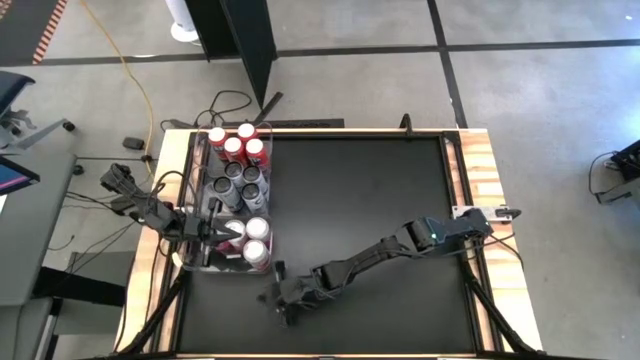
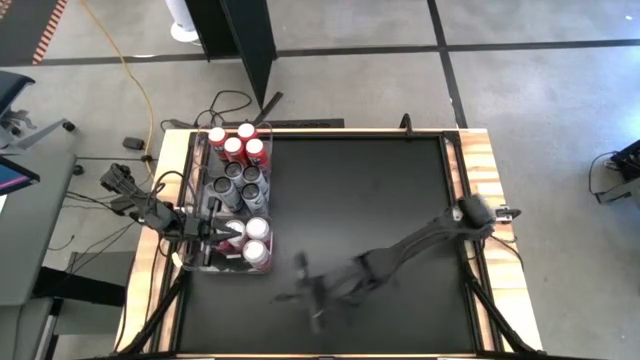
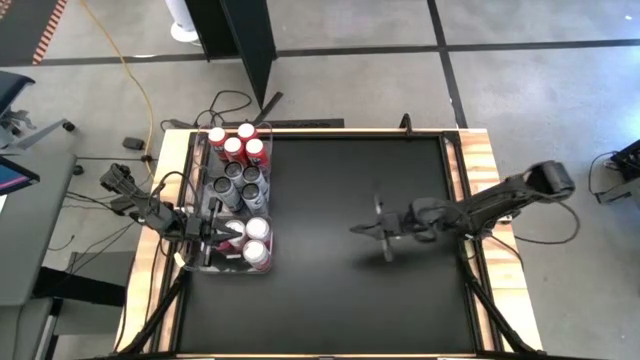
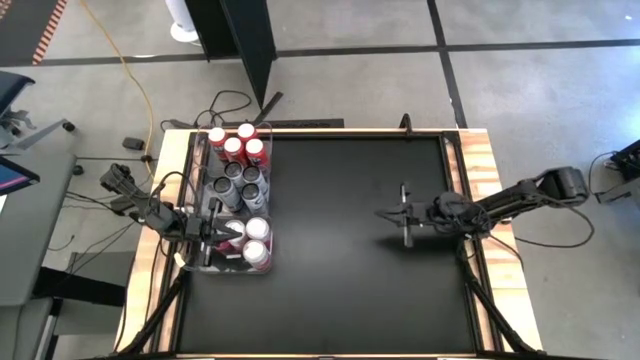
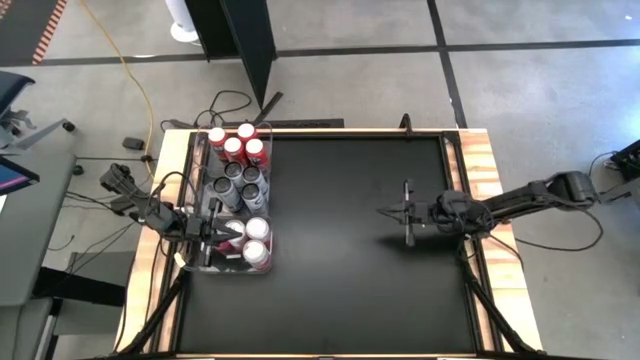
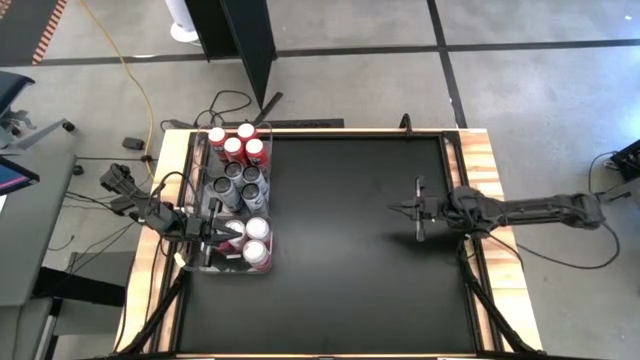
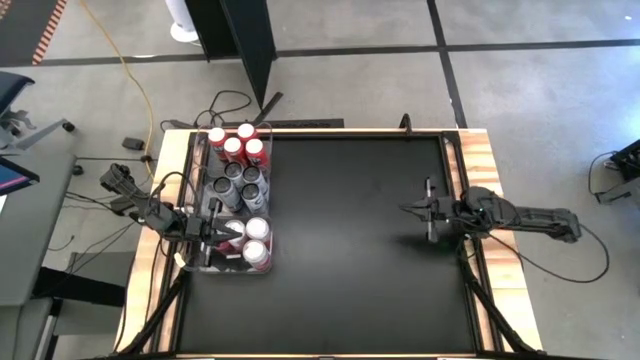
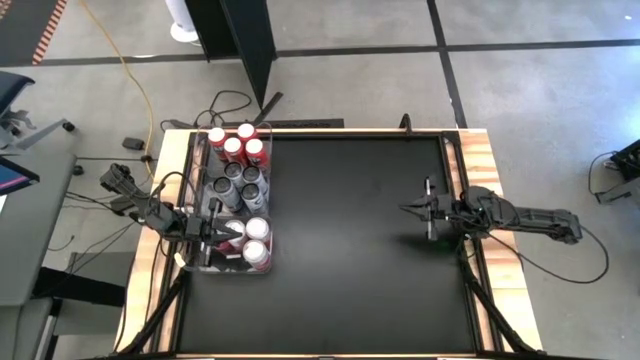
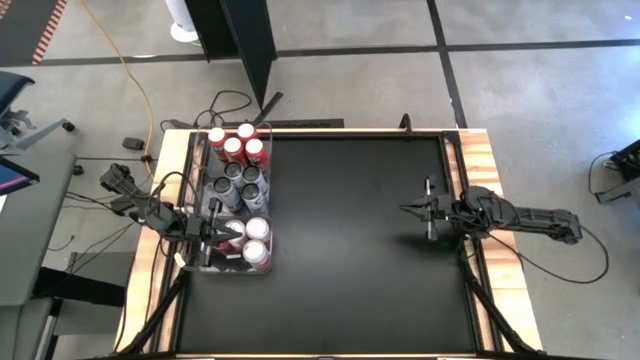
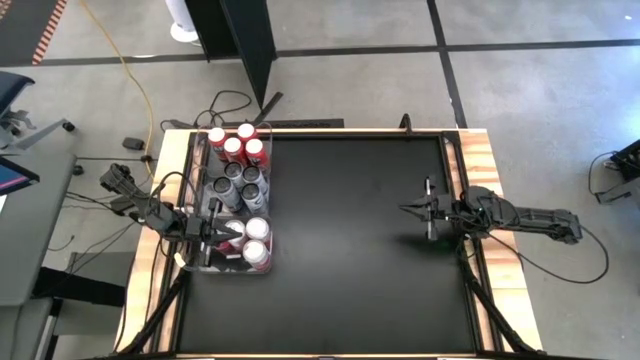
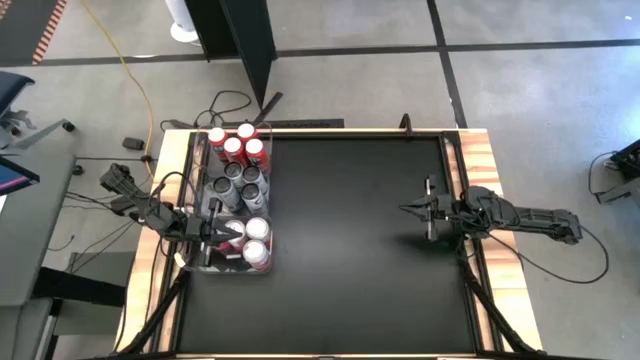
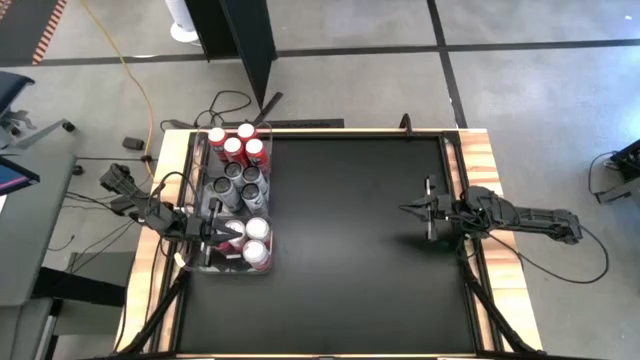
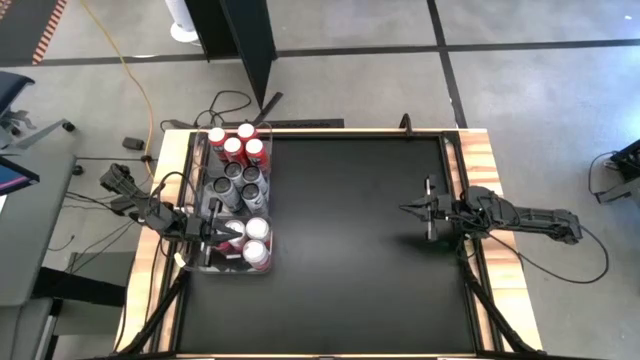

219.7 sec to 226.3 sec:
Task: Sort soda cans
Return to Home Position

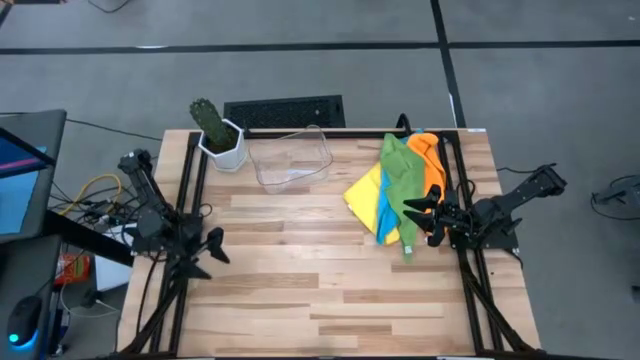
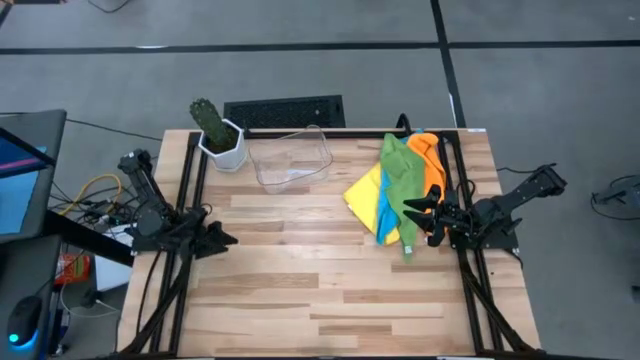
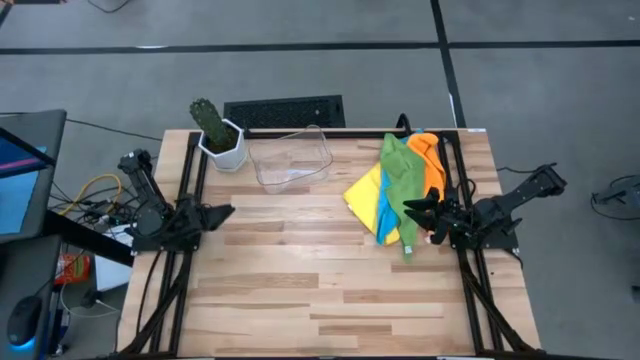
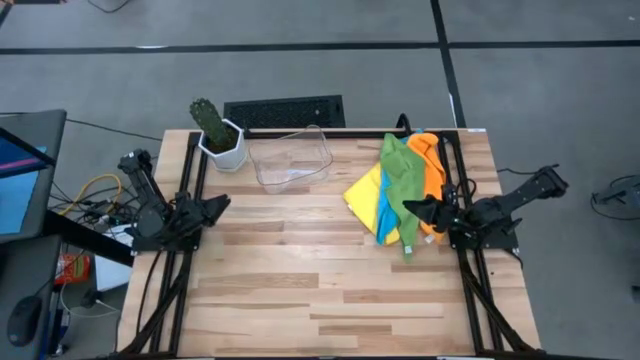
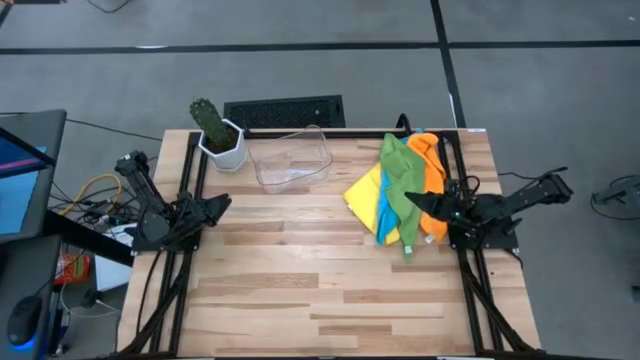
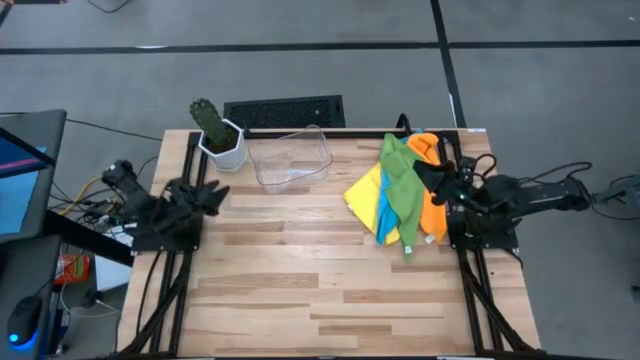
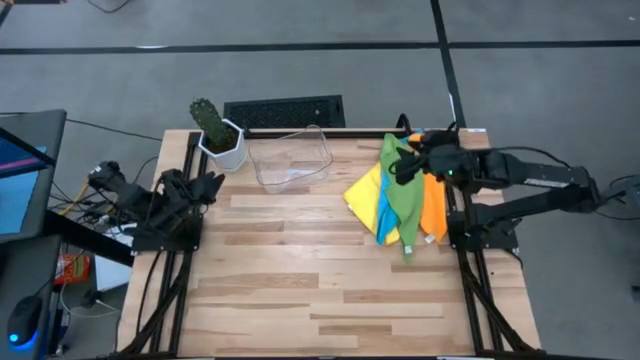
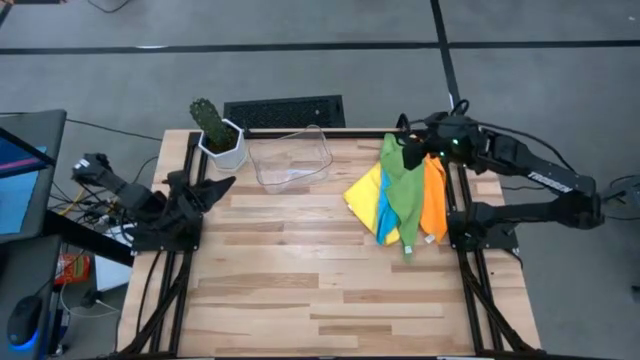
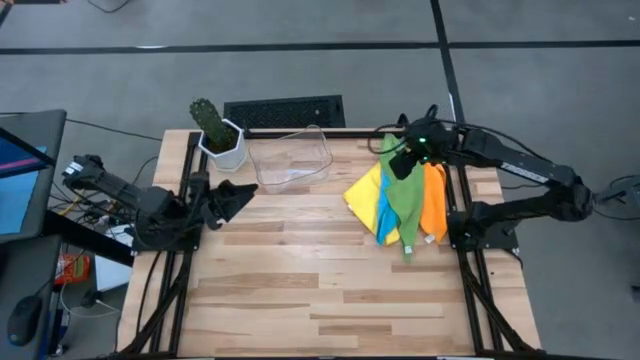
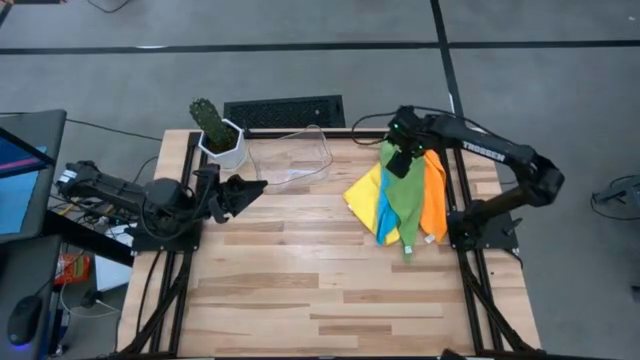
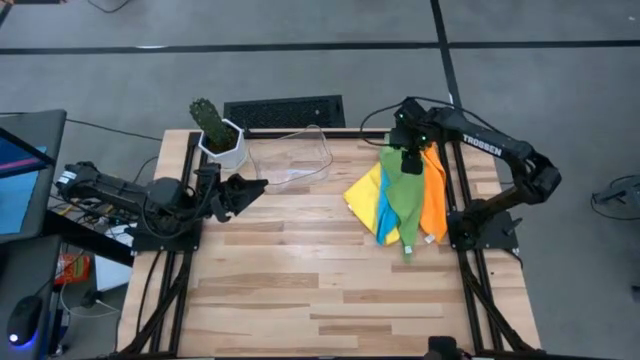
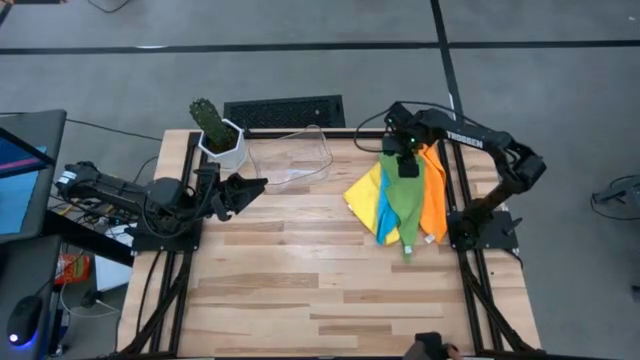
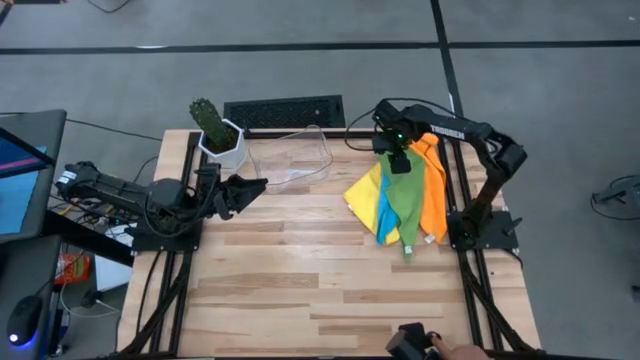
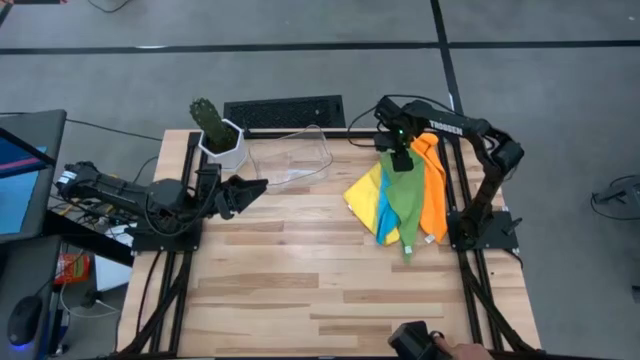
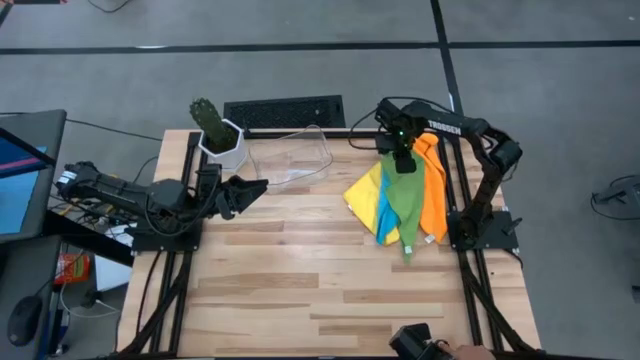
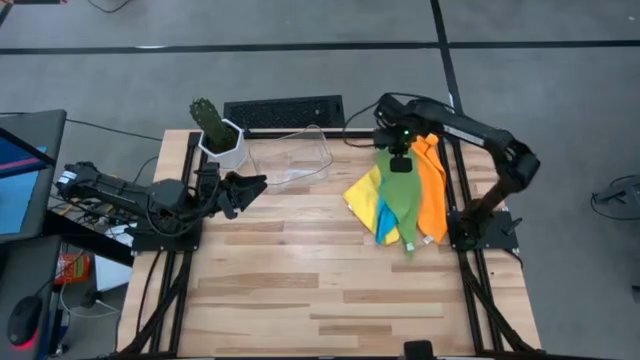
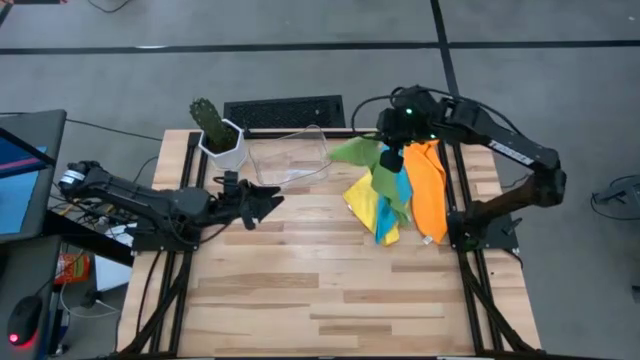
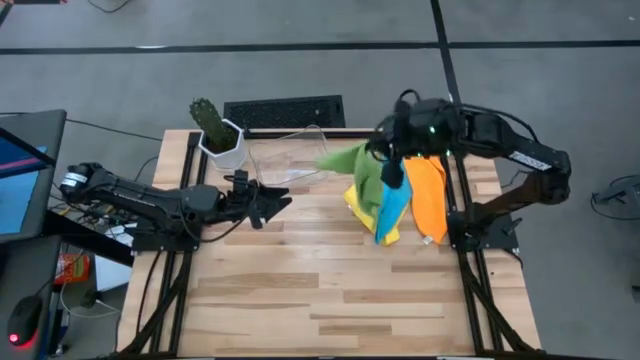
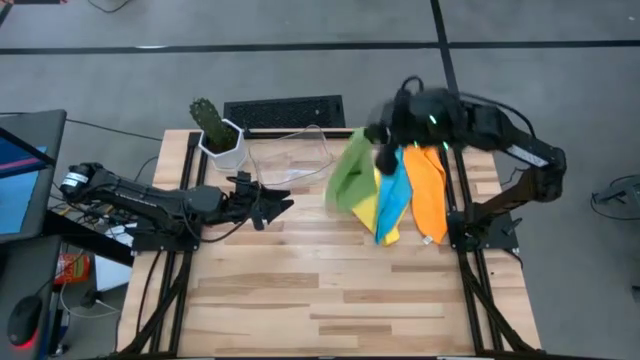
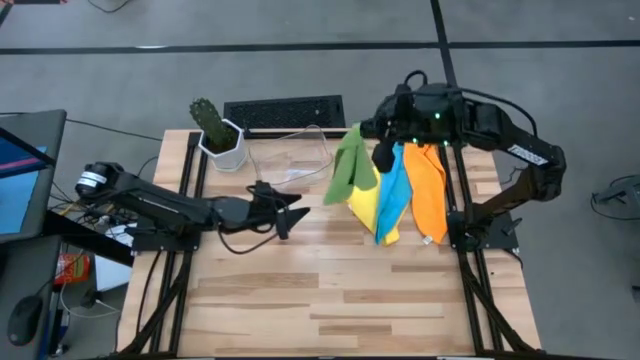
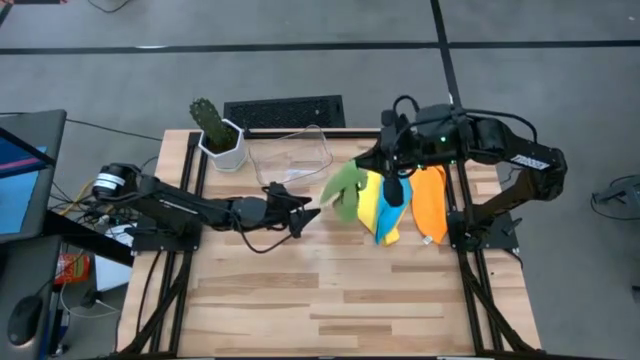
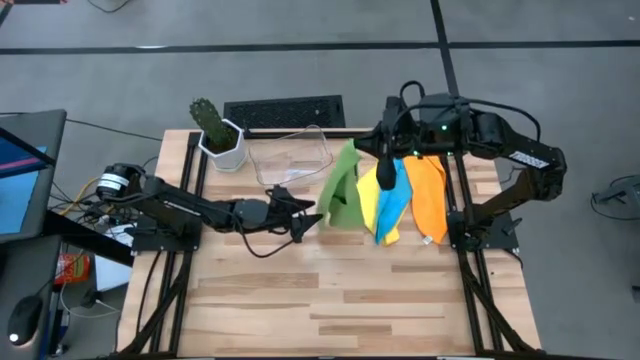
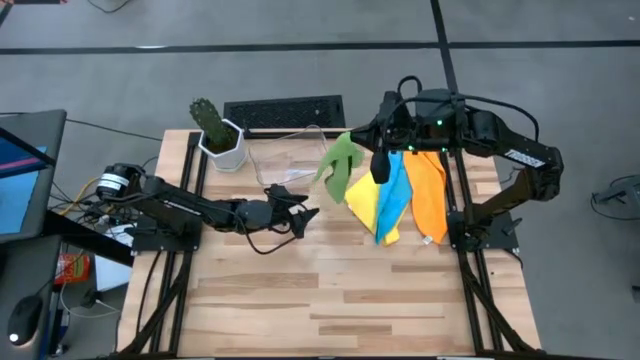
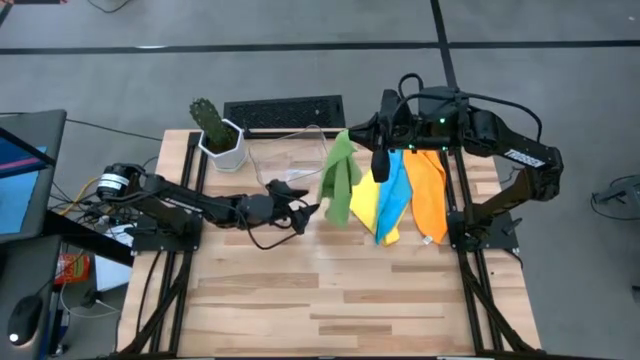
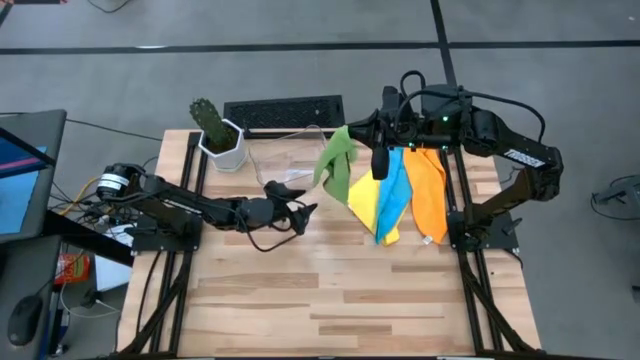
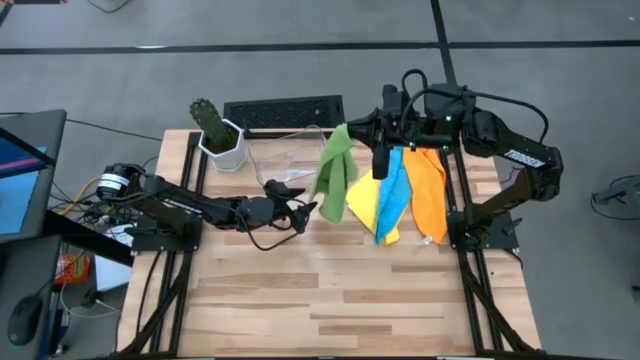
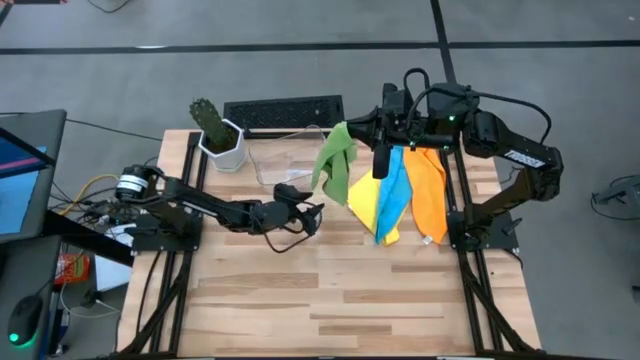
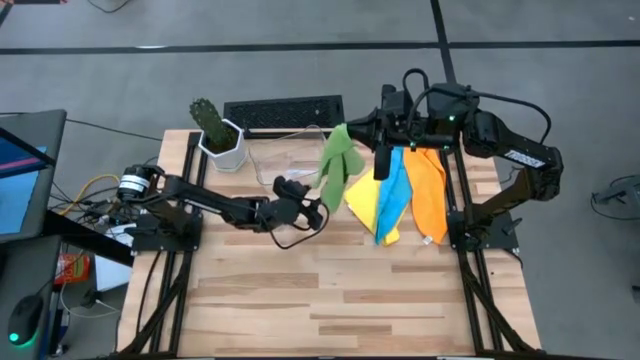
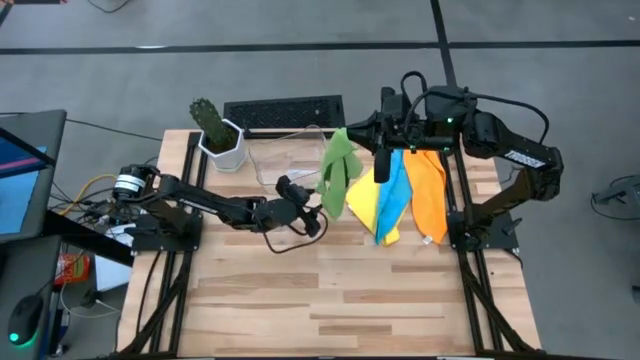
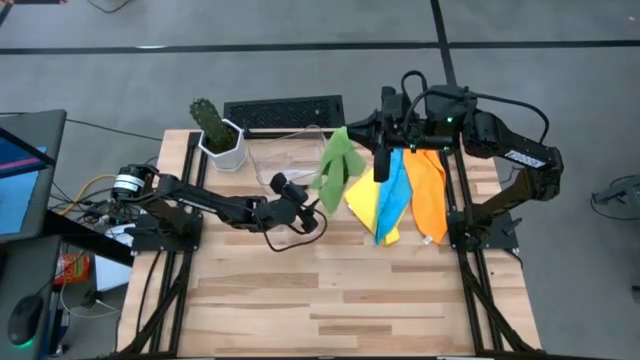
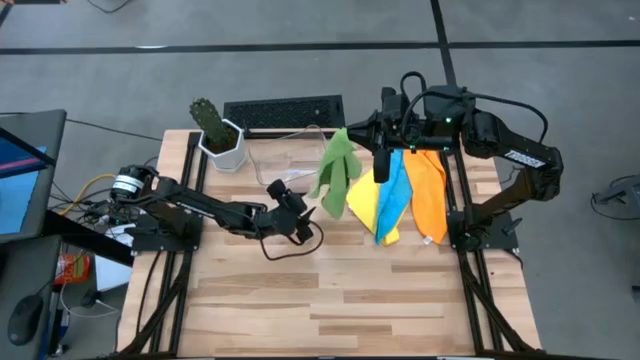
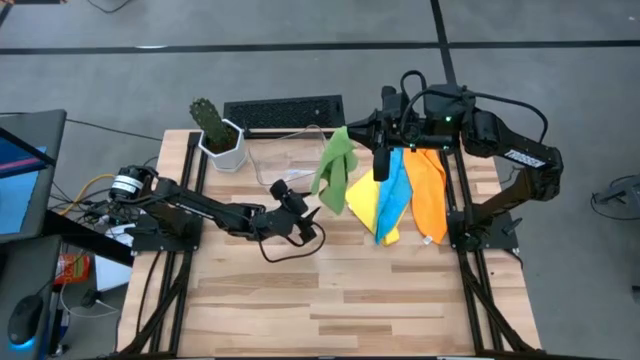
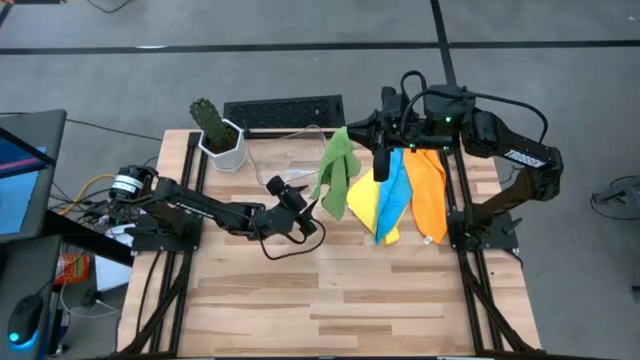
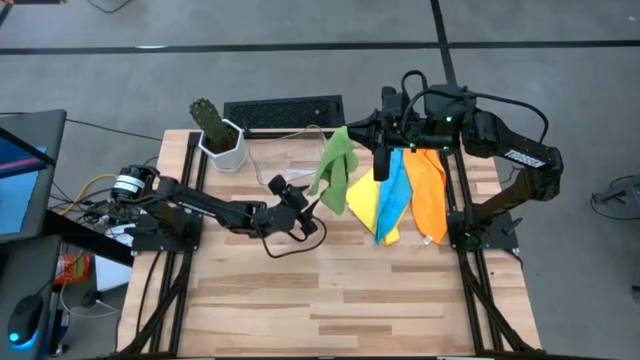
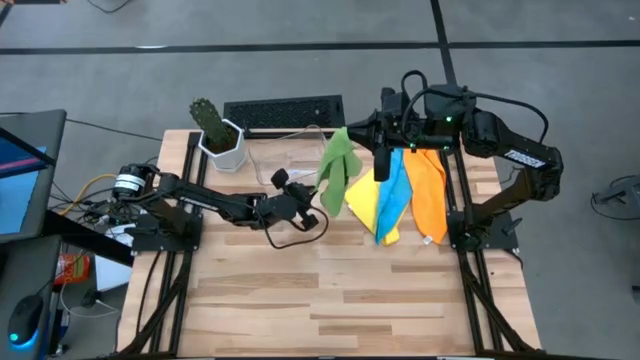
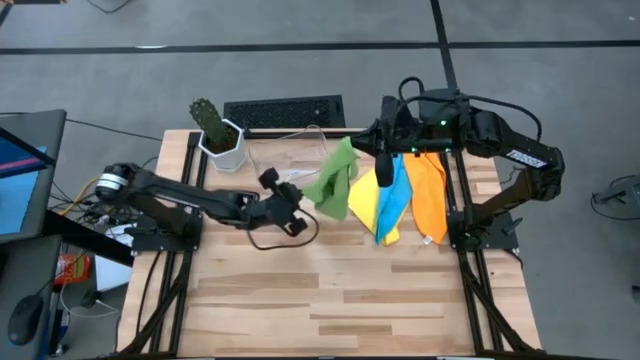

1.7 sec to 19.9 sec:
Task: Fold microfiber towels
Fold the green microfiber cloth
